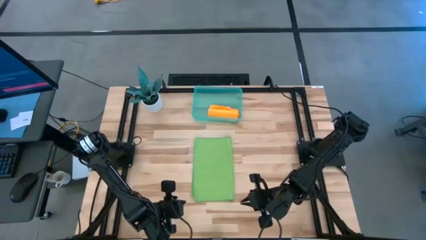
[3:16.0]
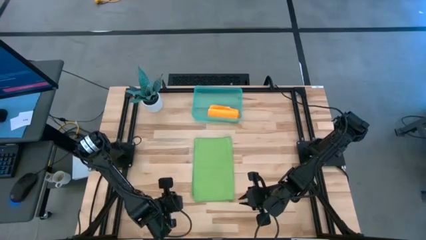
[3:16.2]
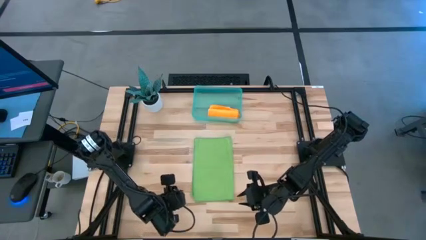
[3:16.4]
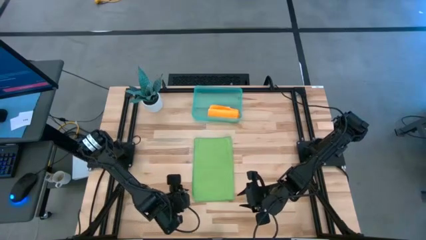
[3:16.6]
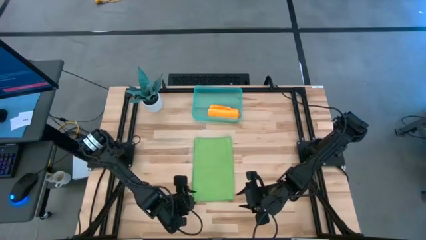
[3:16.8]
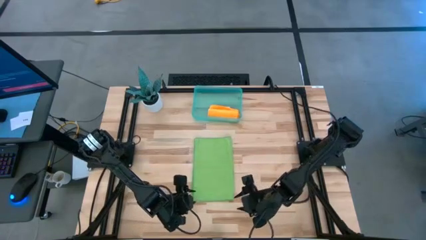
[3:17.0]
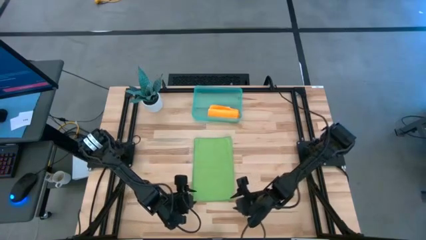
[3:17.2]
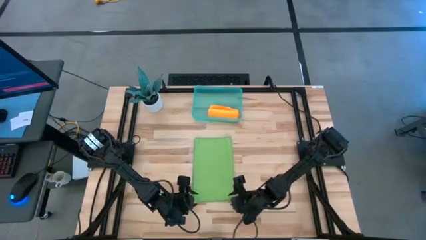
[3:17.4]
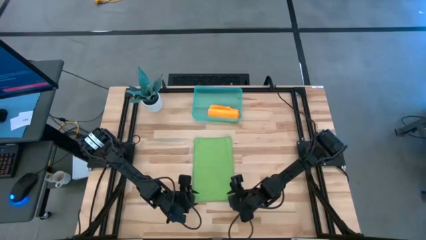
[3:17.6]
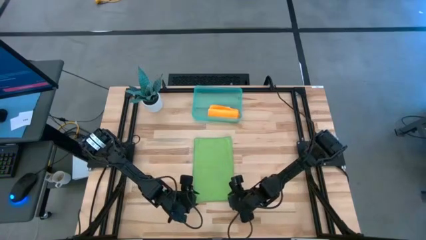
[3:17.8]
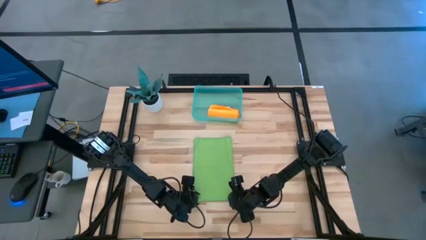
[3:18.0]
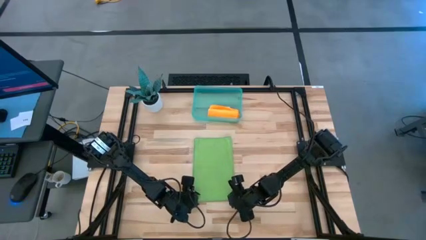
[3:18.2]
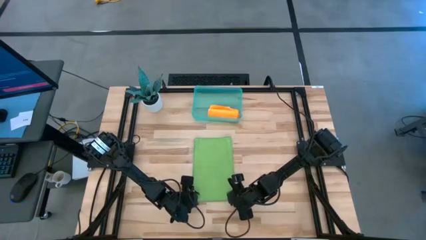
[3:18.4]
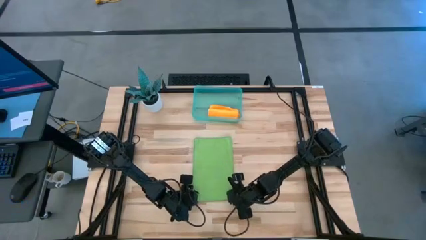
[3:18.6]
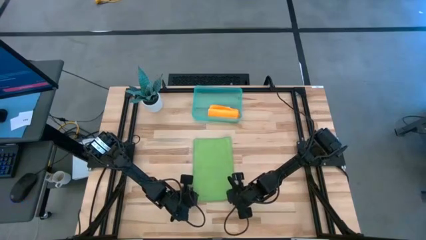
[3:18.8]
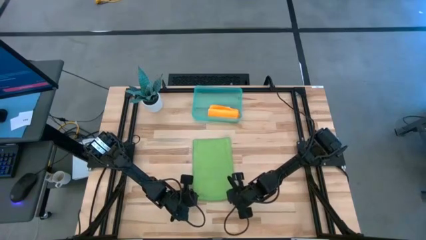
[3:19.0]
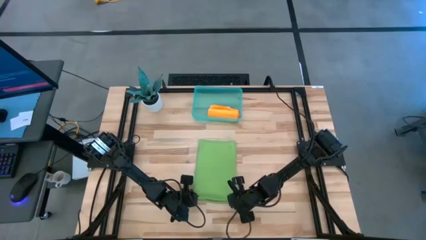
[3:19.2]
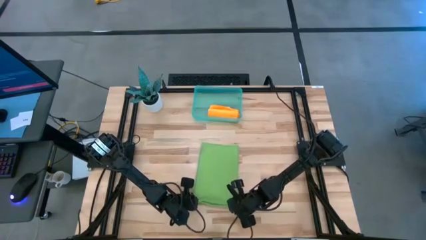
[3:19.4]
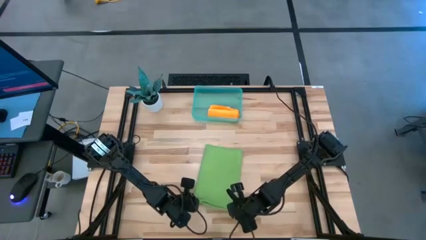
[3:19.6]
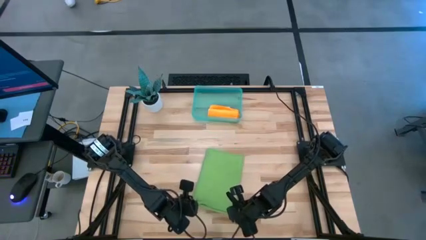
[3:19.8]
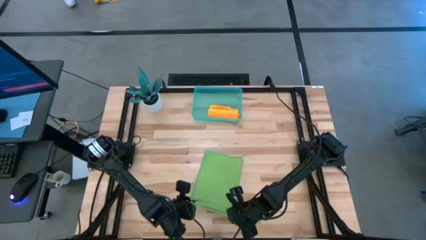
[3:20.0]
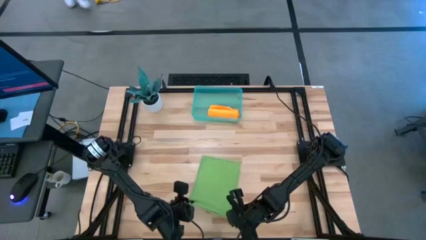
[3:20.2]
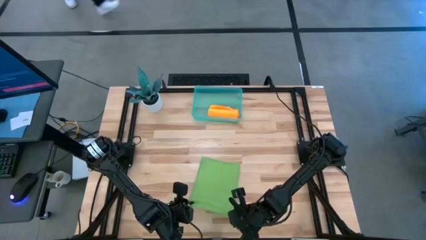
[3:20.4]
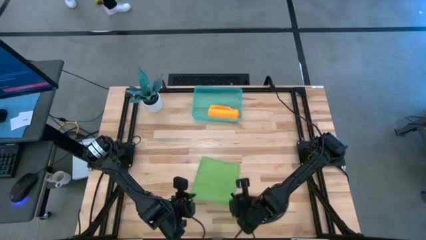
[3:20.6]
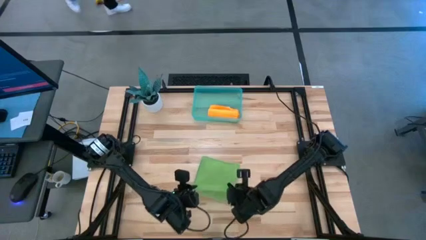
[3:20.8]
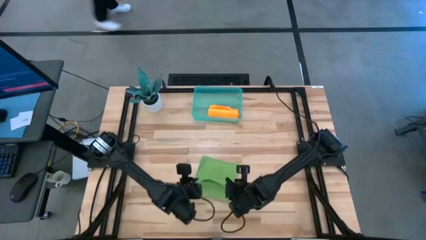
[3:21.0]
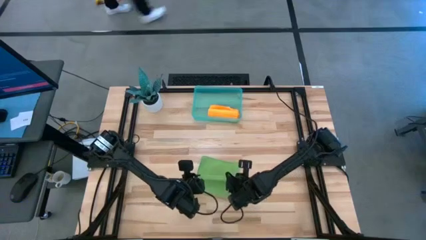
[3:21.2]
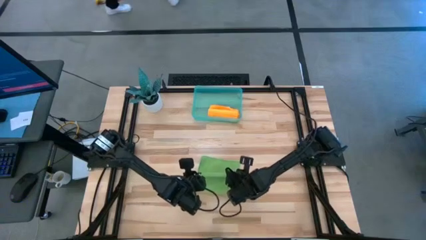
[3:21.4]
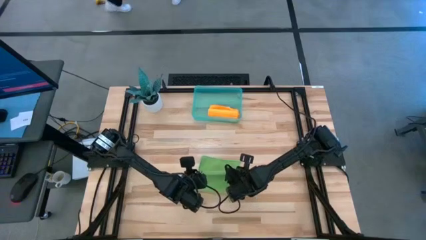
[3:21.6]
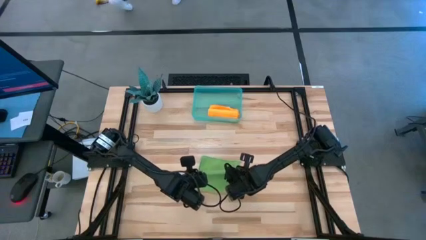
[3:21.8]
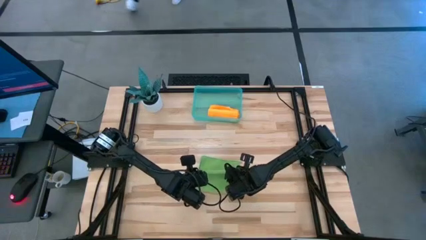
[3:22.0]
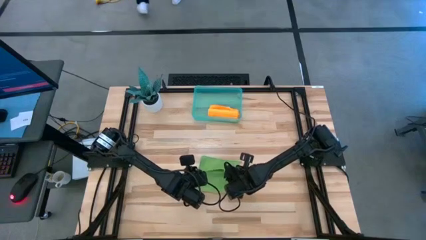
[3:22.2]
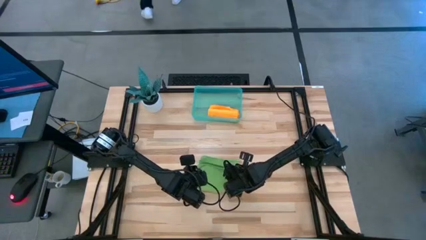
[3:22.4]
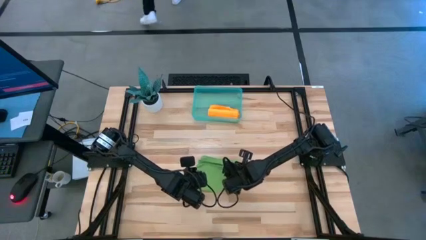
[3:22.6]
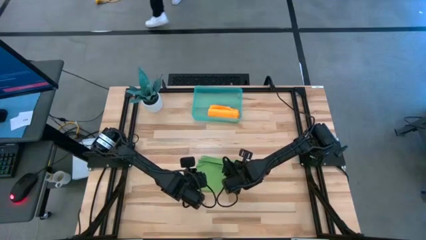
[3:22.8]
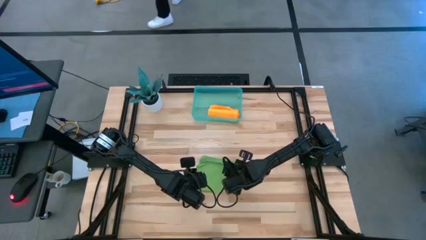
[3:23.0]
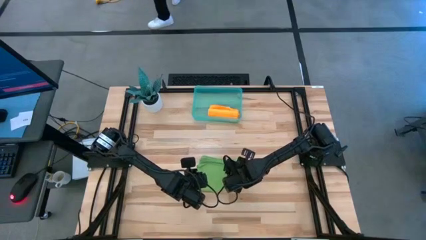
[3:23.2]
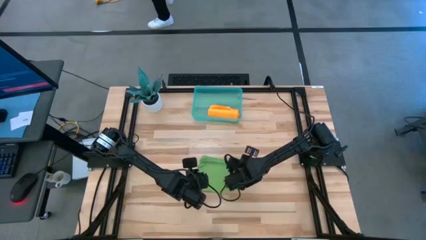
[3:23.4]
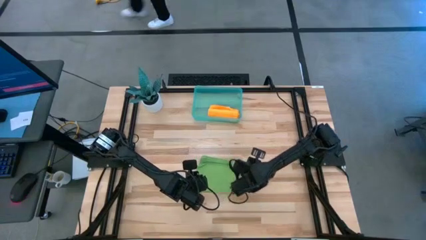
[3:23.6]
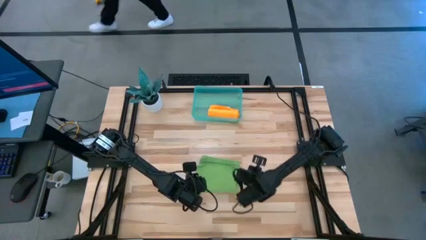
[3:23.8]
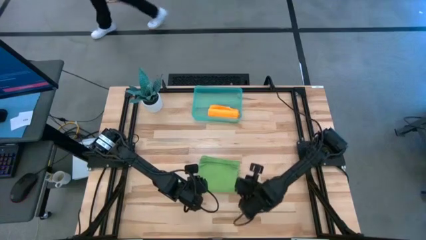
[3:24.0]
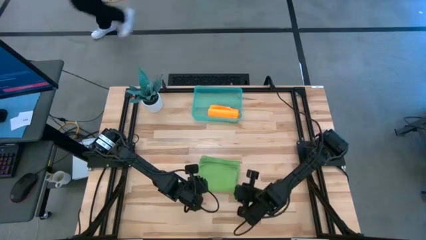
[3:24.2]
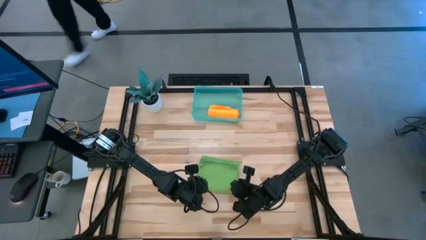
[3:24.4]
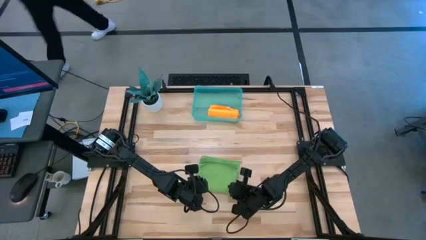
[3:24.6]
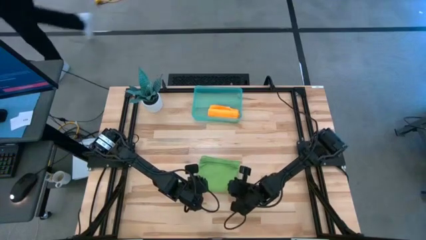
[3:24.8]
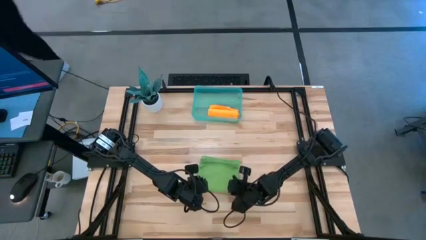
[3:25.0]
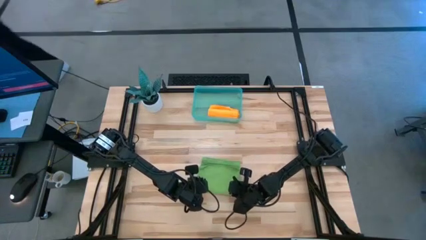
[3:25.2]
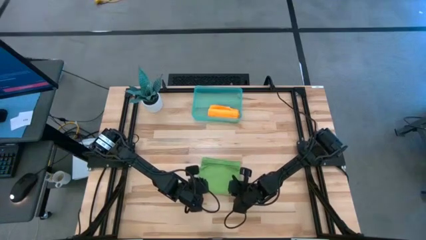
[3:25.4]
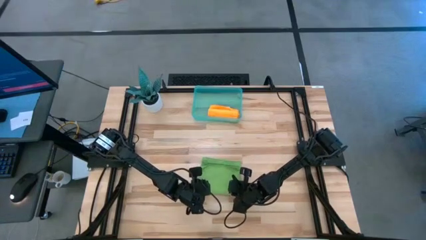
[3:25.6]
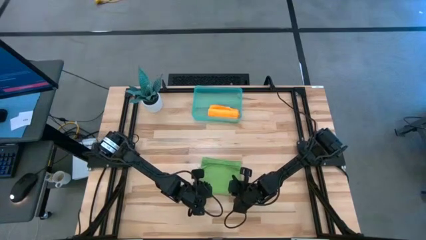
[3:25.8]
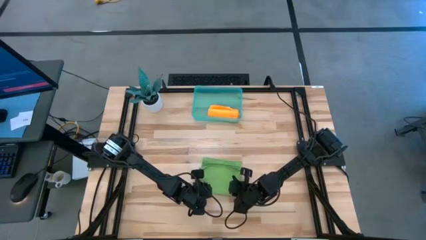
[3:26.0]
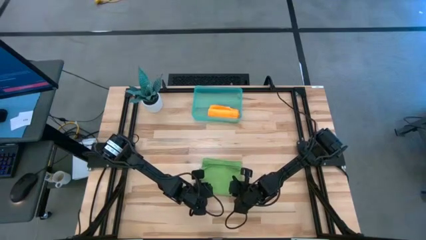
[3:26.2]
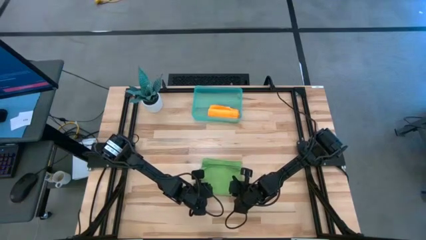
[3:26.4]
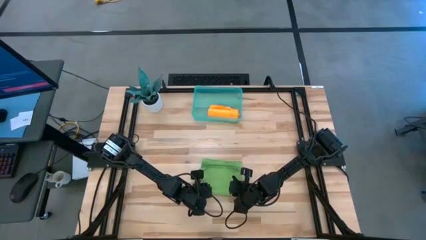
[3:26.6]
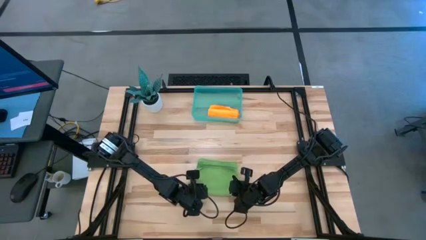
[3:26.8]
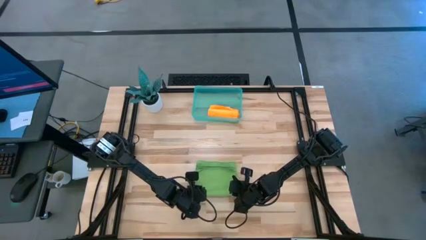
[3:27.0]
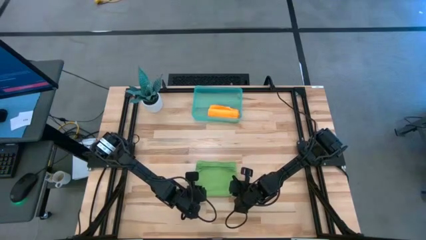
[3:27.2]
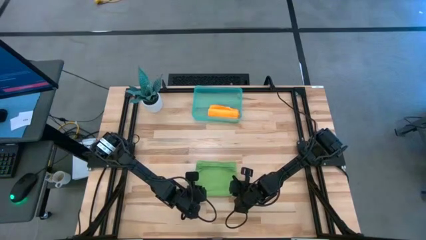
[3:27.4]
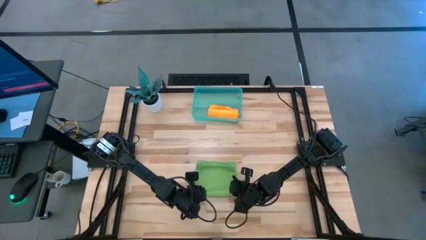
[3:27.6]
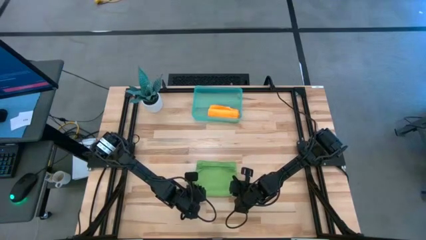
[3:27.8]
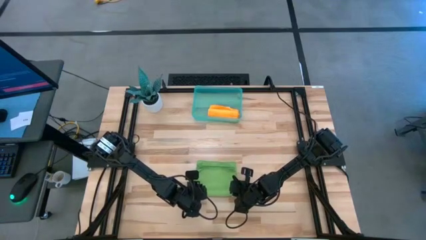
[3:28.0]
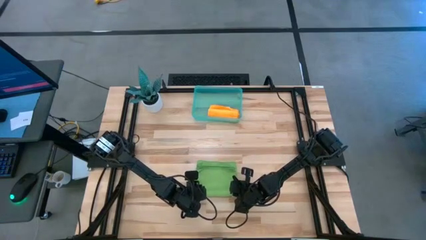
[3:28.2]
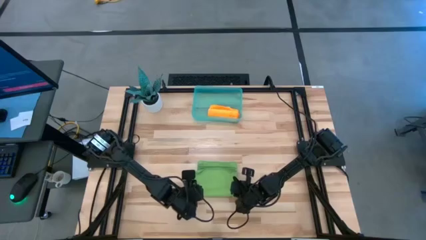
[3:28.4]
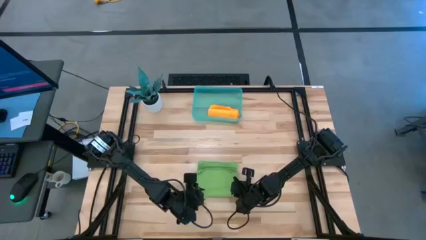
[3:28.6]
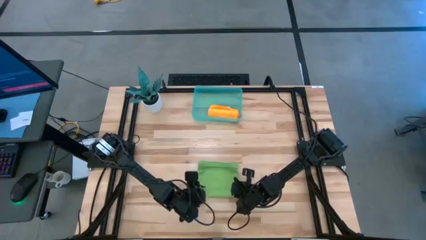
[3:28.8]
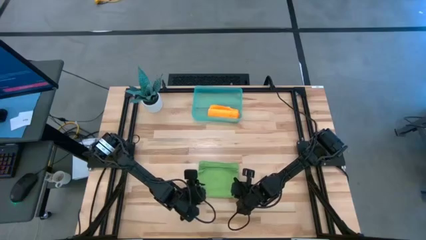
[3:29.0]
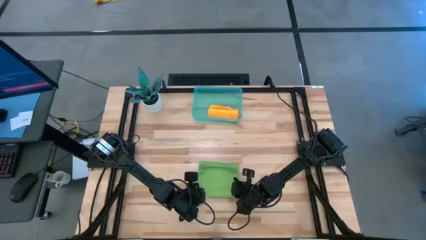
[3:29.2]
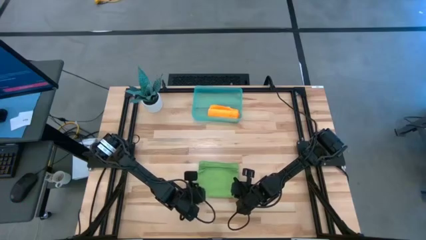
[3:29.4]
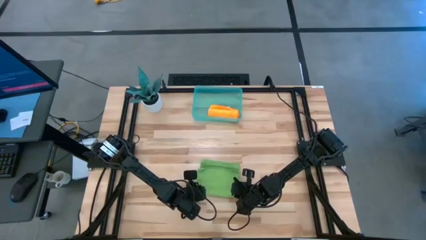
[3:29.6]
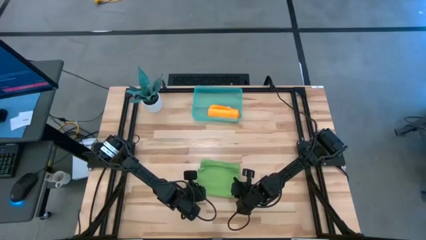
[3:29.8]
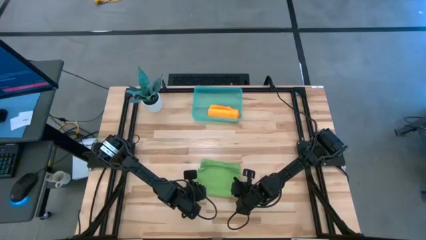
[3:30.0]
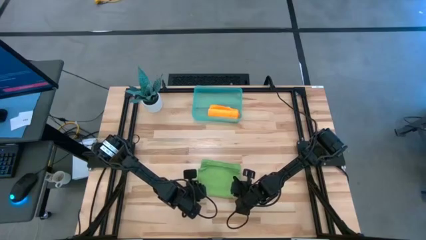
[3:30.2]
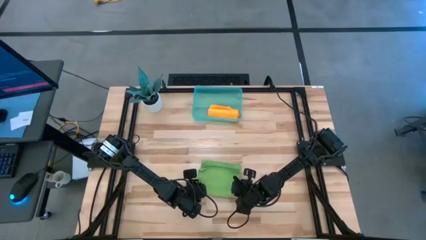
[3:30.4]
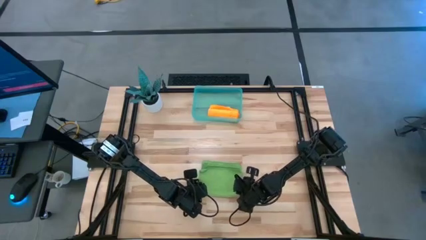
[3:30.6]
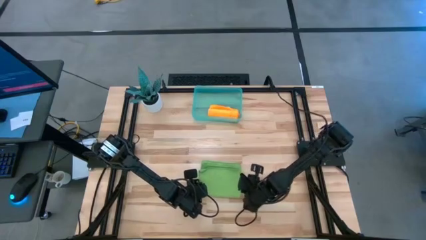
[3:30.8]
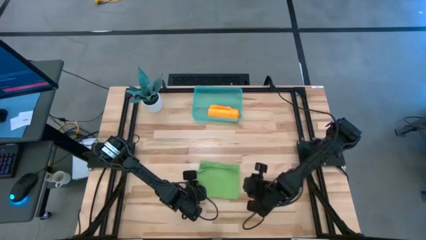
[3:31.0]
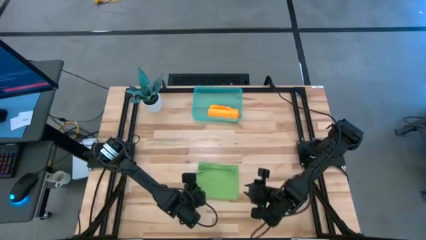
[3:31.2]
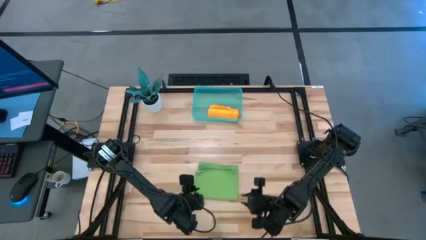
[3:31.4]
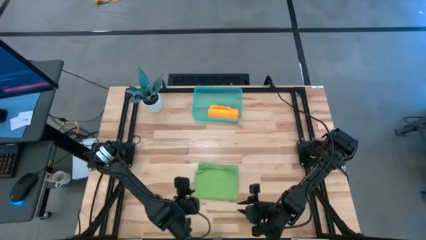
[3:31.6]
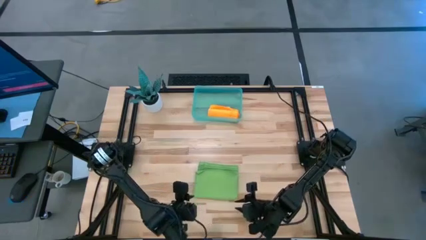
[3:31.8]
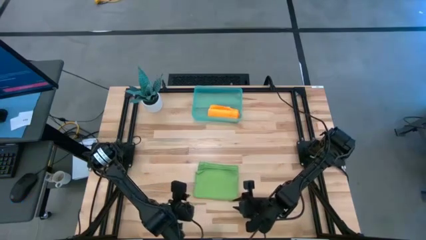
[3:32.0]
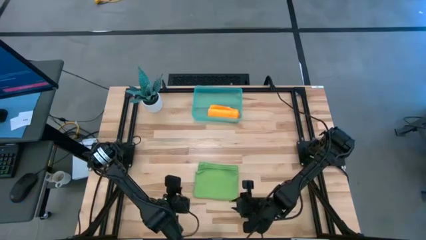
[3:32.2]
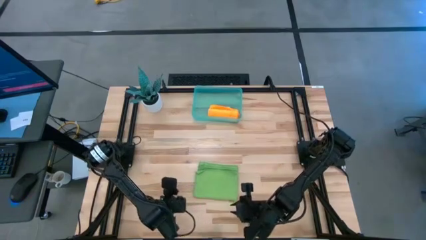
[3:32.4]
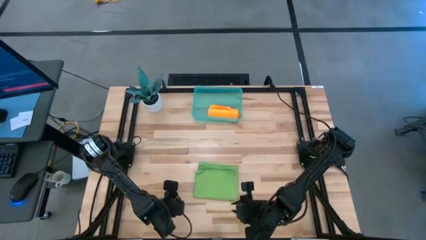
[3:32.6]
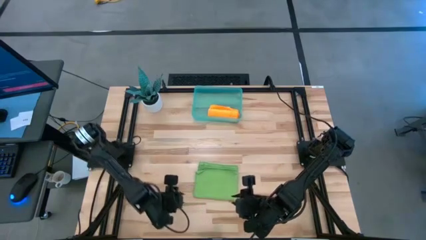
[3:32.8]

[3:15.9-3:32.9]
Task: Roll microfiber towels into tight, uniform cylinder then place into a basket
Roll the green microfiber cloth
